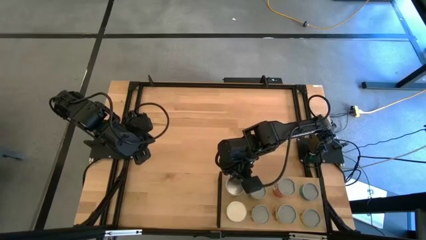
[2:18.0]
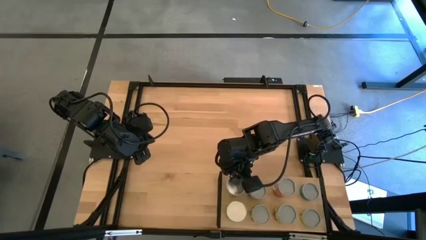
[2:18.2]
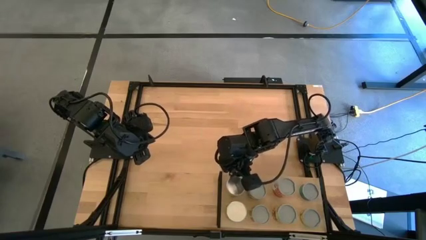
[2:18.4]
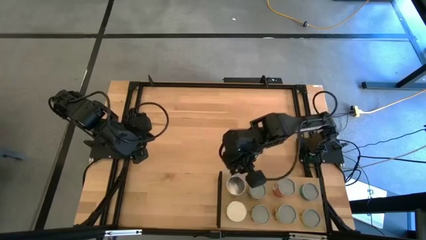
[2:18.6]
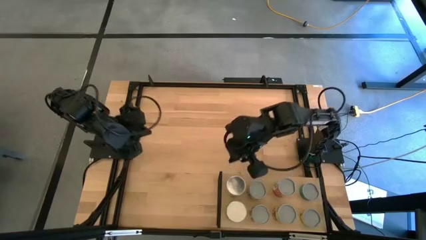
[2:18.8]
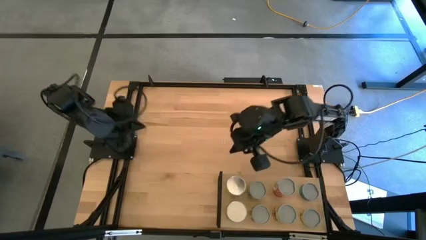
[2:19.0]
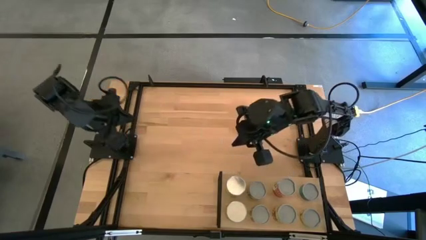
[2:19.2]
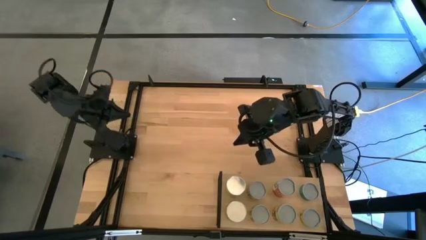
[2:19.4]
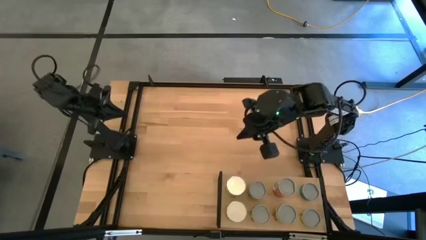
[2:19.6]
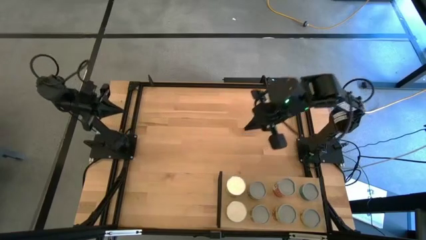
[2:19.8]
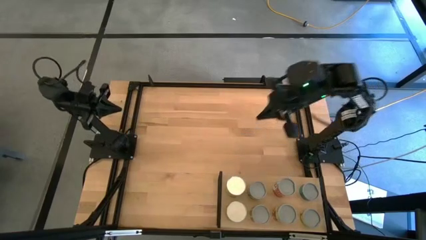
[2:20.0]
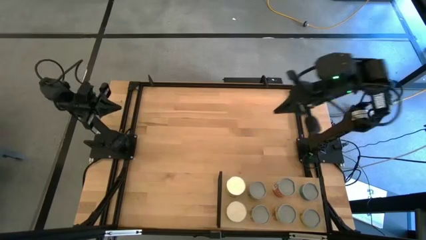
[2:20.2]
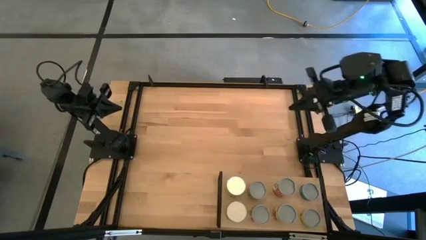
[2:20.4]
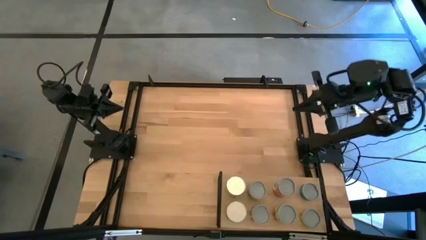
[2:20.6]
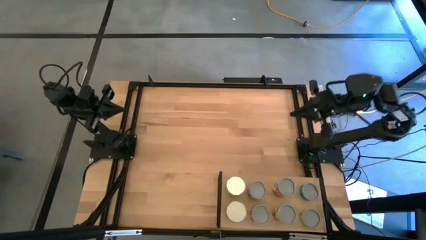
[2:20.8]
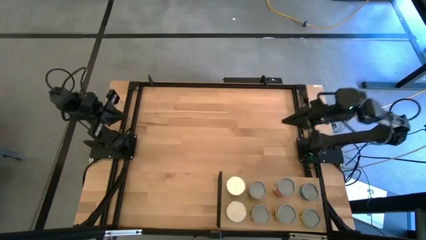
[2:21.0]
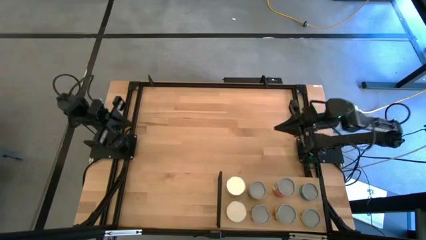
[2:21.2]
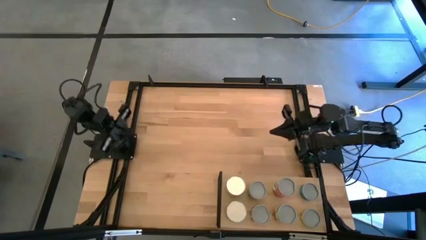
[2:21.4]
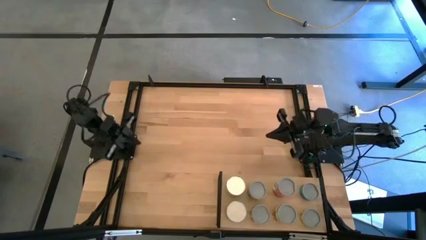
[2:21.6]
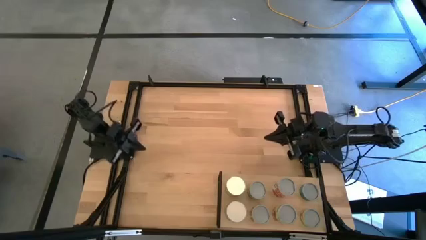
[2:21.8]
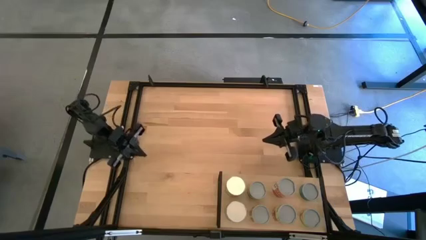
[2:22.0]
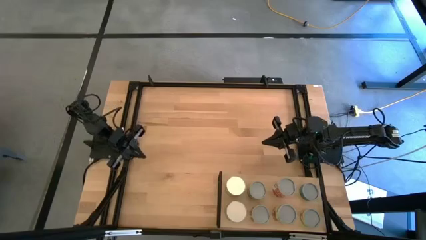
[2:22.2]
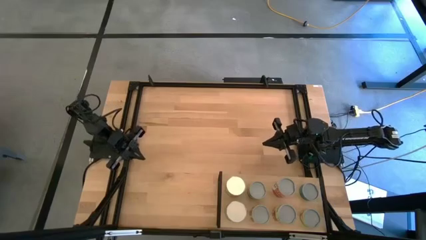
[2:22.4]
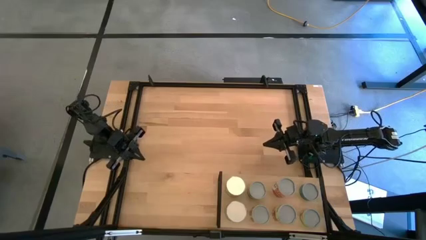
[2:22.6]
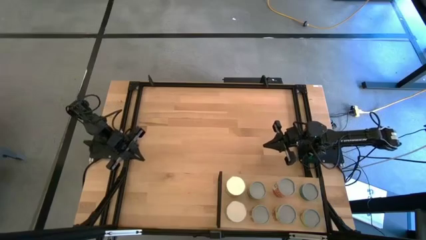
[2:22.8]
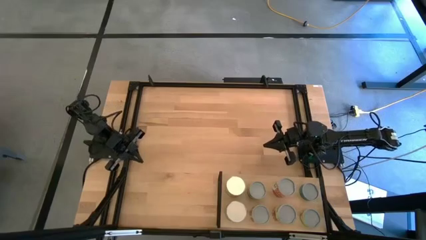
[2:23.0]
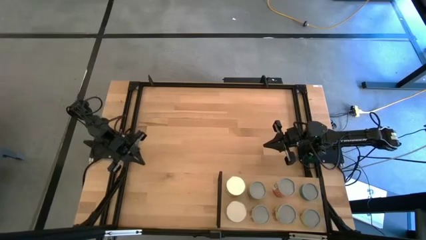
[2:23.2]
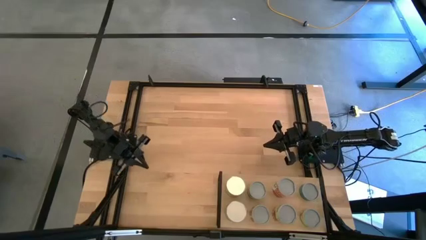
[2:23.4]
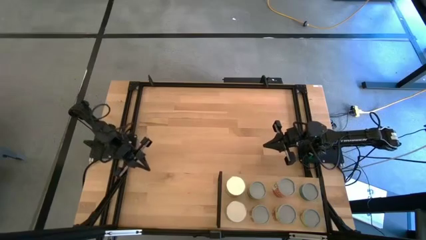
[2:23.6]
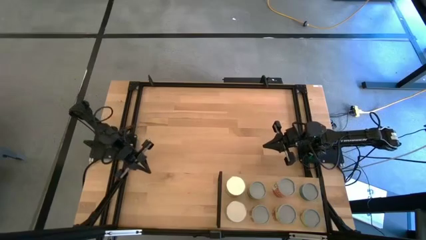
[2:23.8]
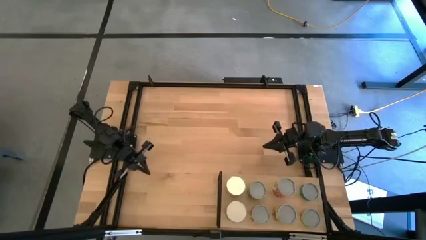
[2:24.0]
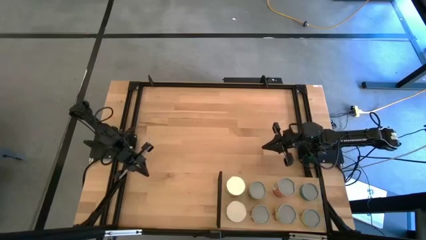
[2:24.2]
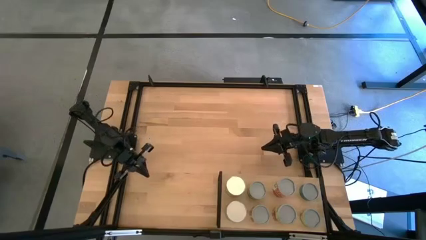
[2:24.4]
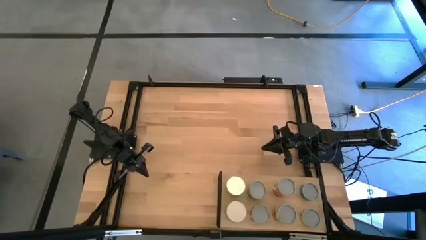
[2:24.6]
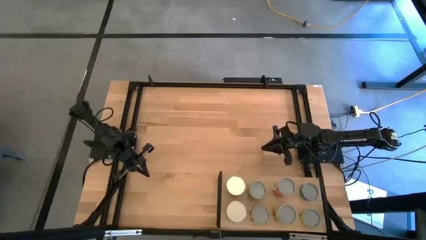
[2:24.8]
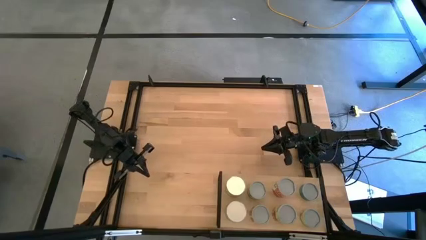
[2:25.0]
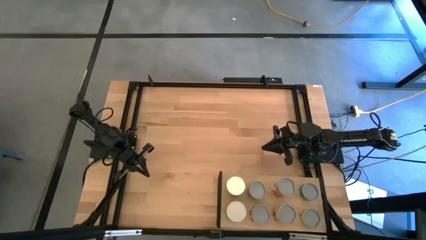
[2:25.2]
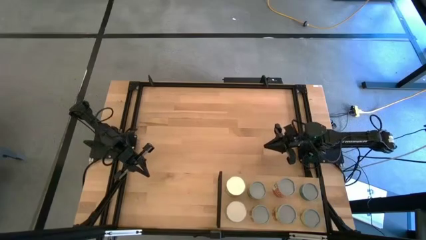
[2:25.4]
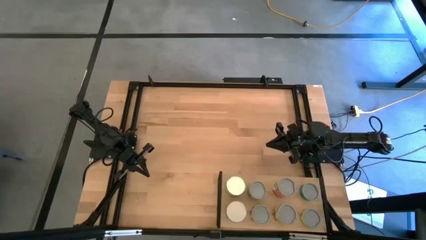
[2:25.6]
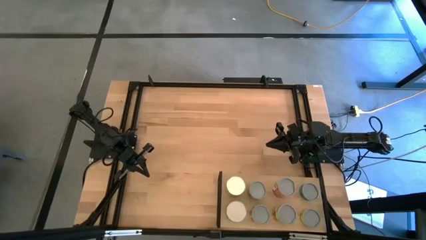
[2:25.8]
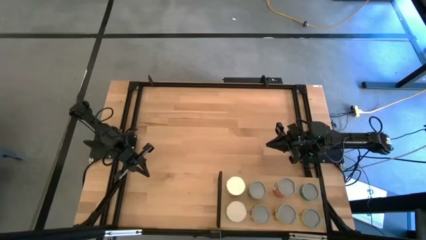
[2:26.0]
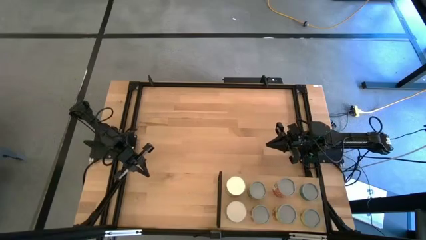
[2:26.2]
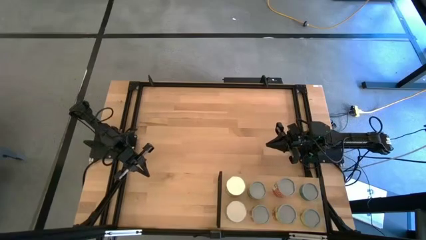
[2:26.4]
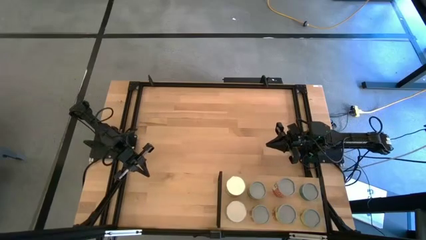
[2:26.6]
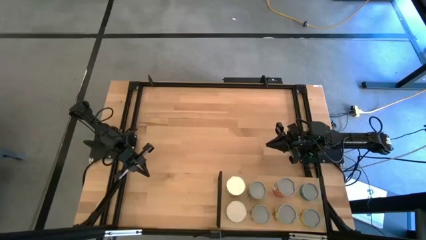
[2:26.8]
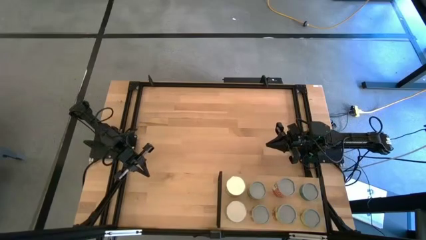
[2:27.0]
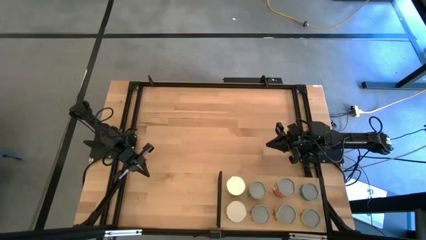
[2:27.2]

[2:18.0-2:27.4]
Task: Pick and place cans onto a shelf
Return to Home Position
